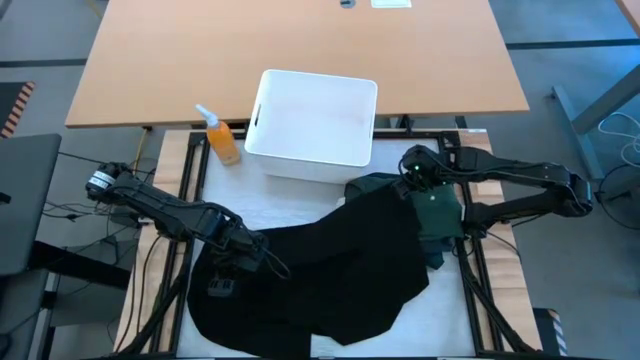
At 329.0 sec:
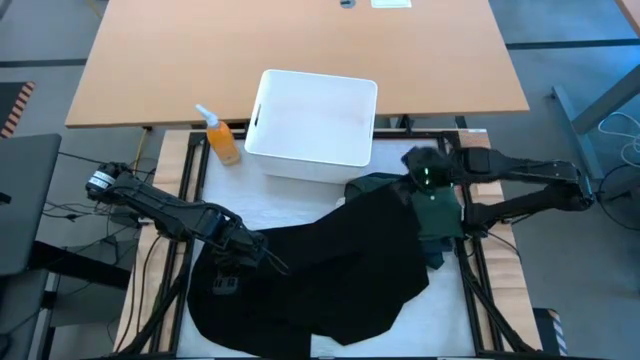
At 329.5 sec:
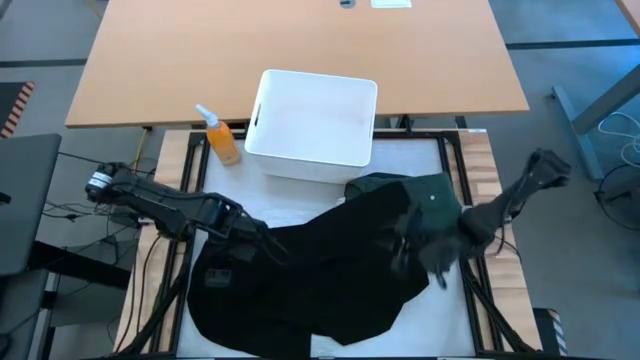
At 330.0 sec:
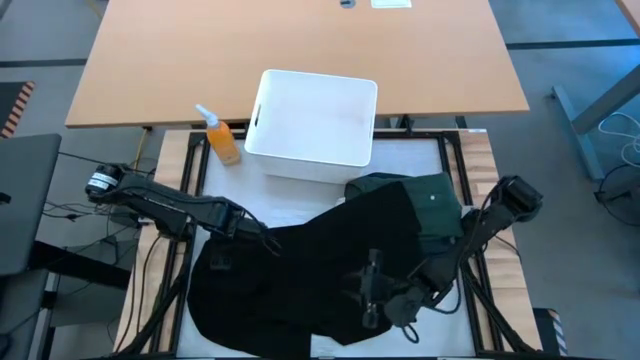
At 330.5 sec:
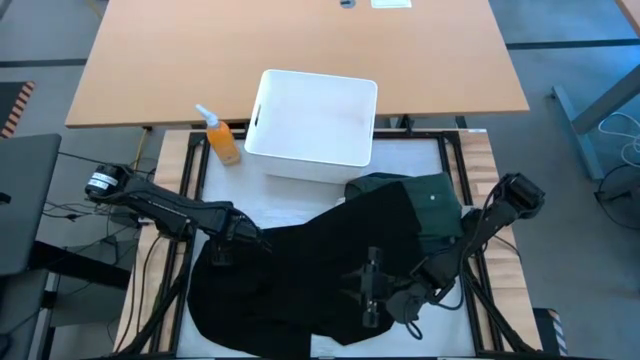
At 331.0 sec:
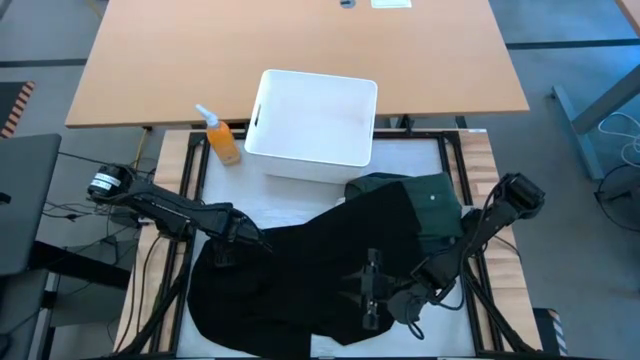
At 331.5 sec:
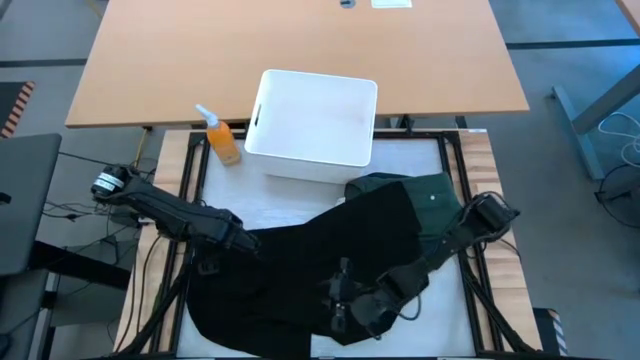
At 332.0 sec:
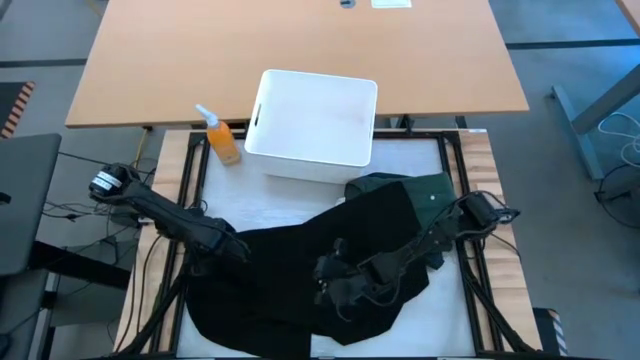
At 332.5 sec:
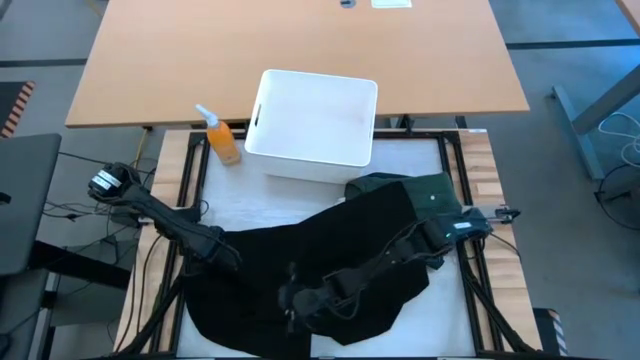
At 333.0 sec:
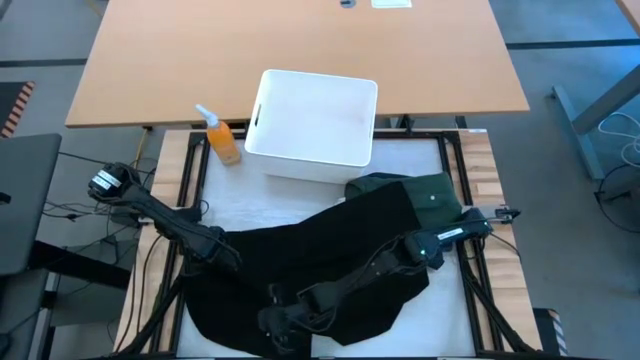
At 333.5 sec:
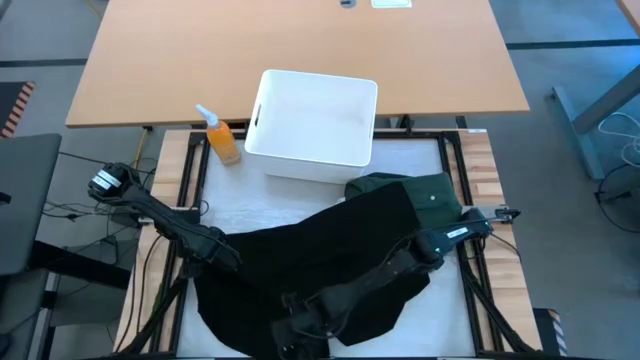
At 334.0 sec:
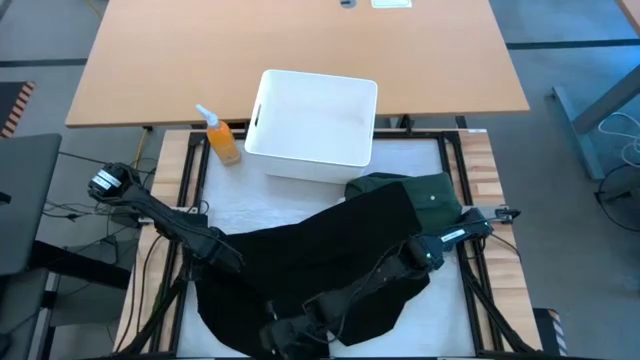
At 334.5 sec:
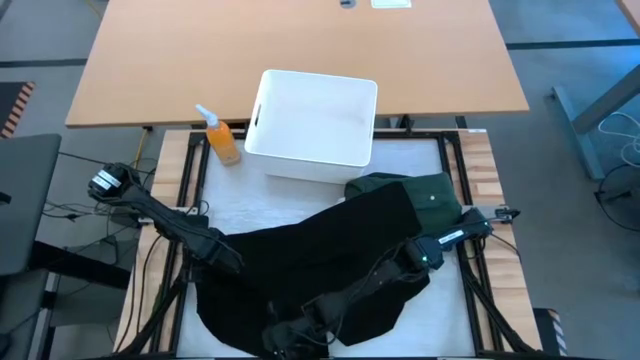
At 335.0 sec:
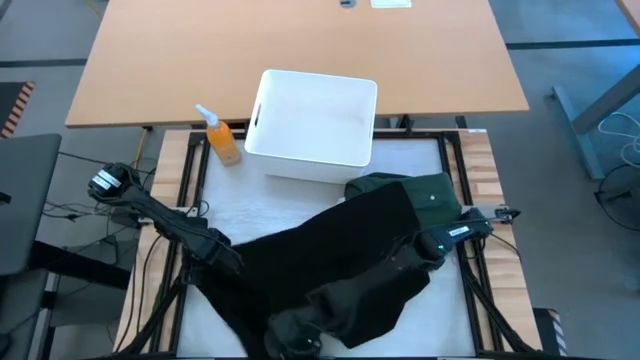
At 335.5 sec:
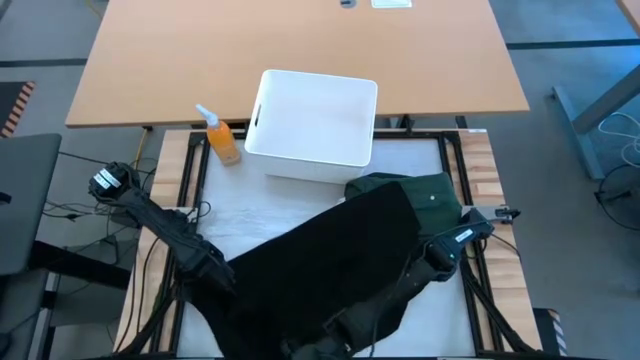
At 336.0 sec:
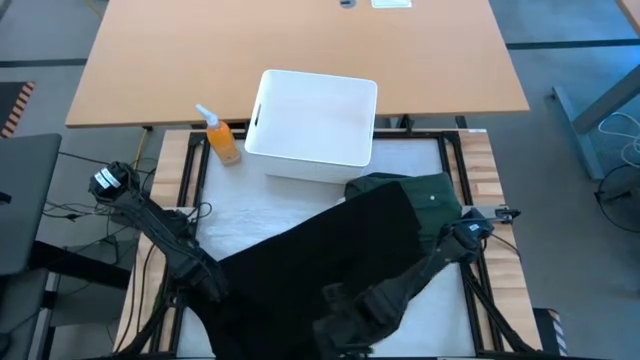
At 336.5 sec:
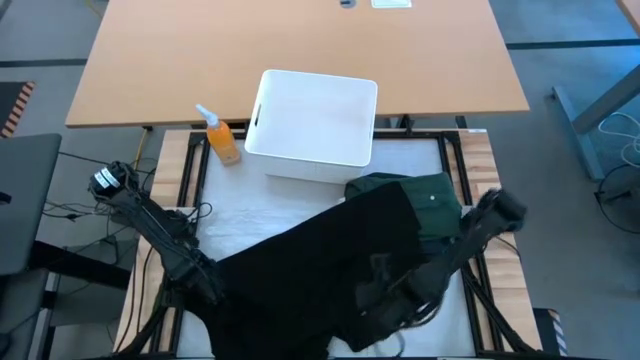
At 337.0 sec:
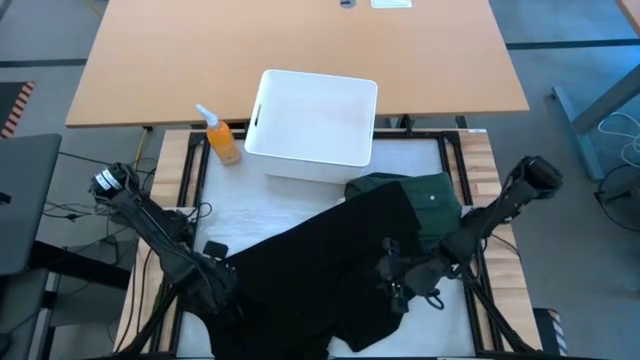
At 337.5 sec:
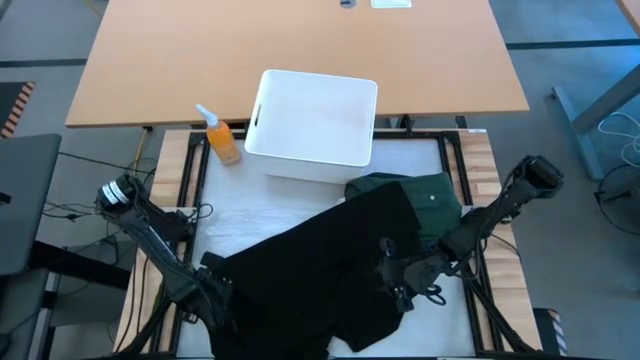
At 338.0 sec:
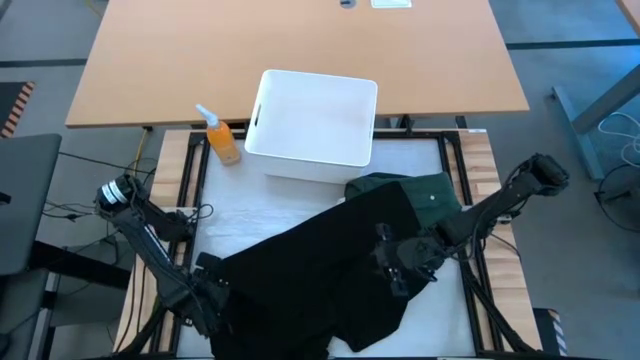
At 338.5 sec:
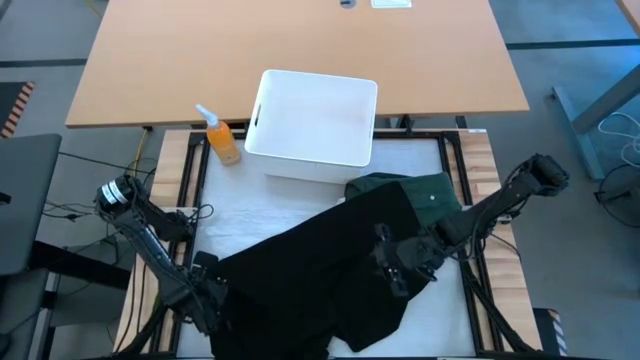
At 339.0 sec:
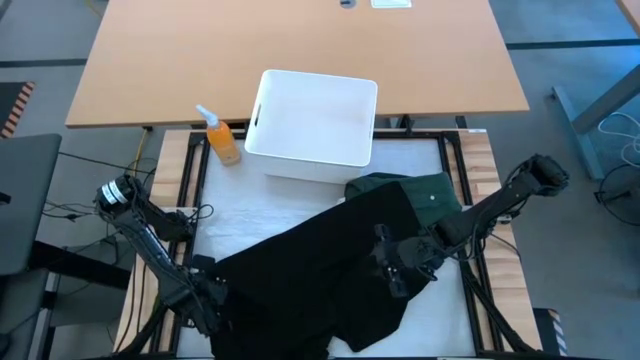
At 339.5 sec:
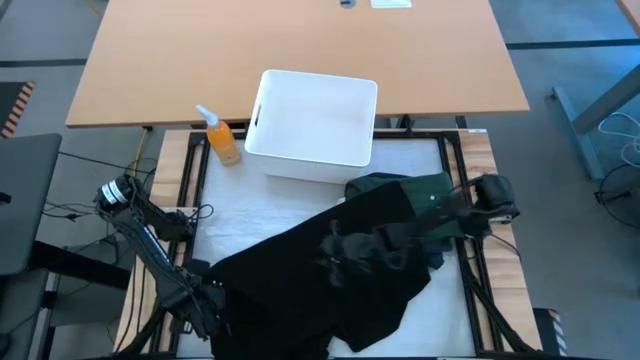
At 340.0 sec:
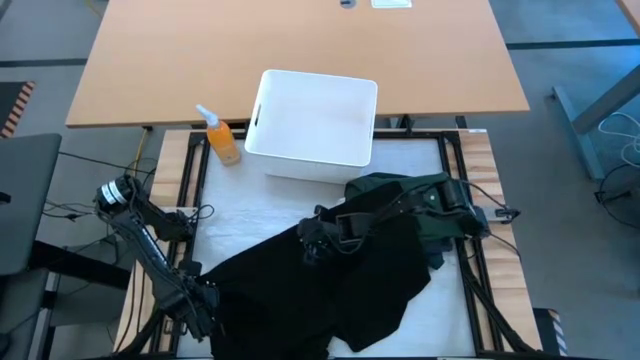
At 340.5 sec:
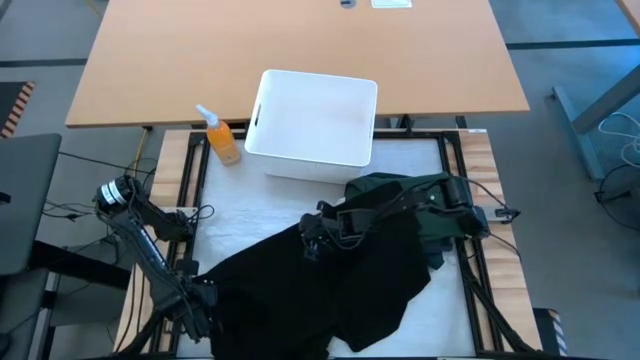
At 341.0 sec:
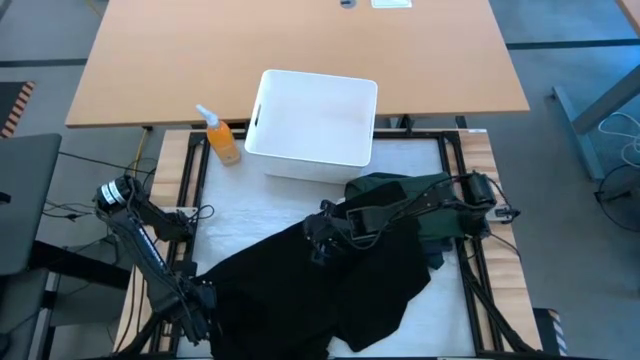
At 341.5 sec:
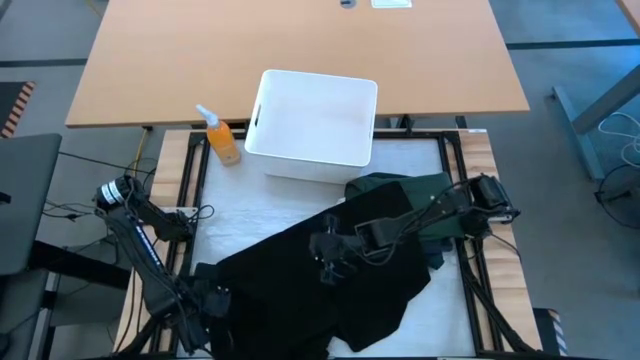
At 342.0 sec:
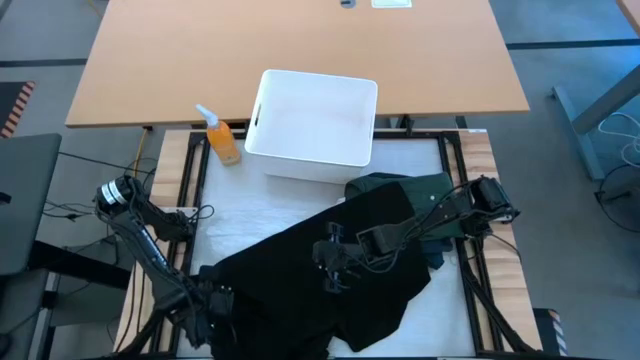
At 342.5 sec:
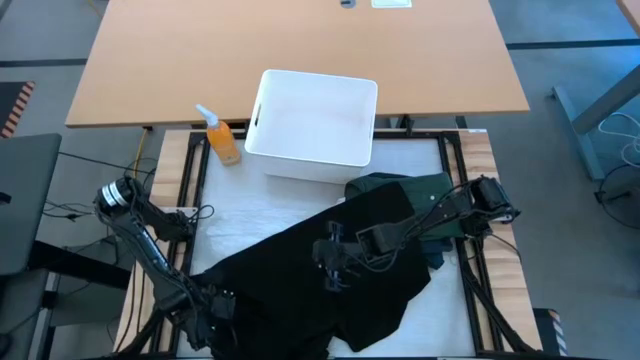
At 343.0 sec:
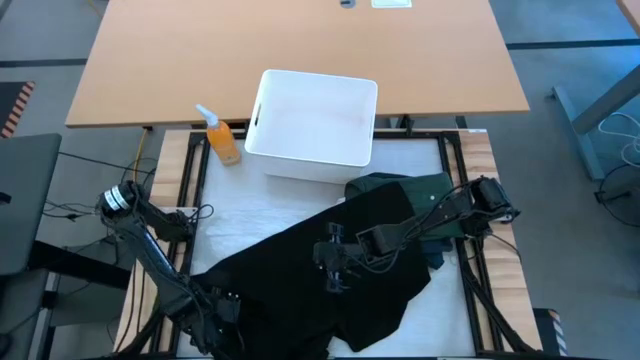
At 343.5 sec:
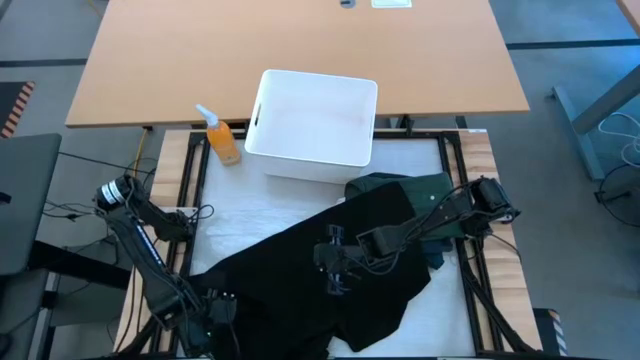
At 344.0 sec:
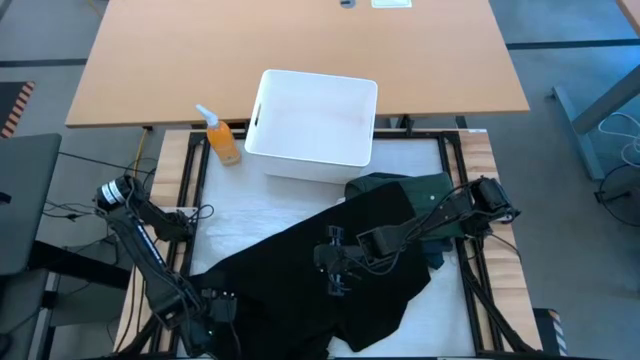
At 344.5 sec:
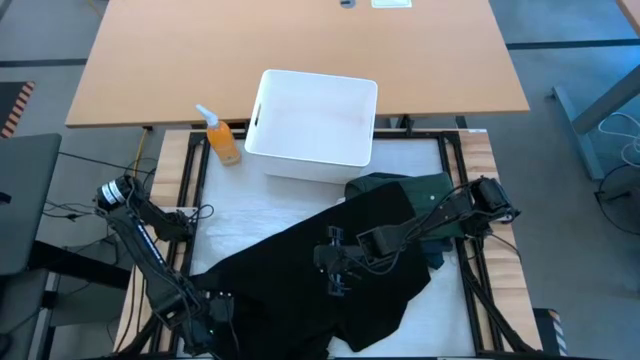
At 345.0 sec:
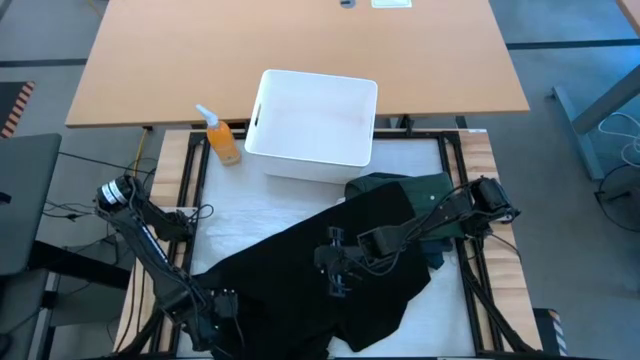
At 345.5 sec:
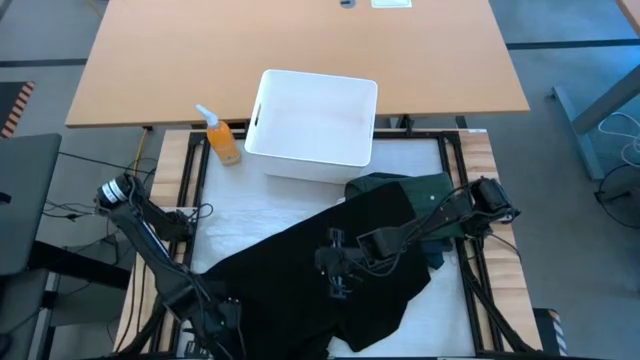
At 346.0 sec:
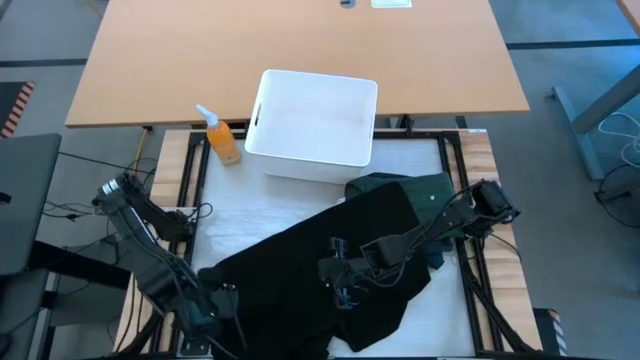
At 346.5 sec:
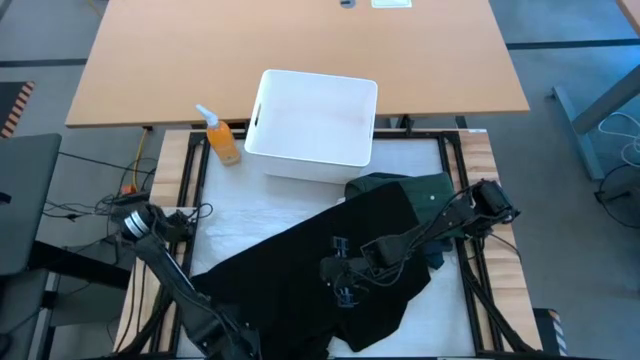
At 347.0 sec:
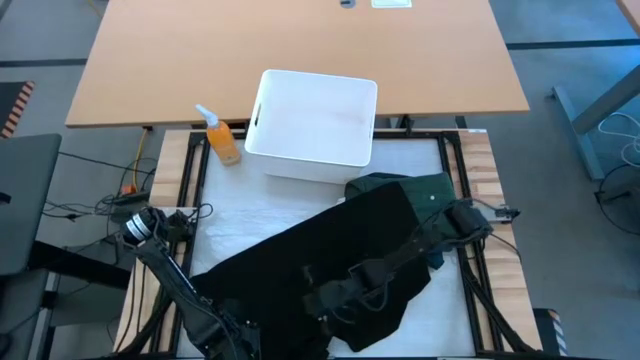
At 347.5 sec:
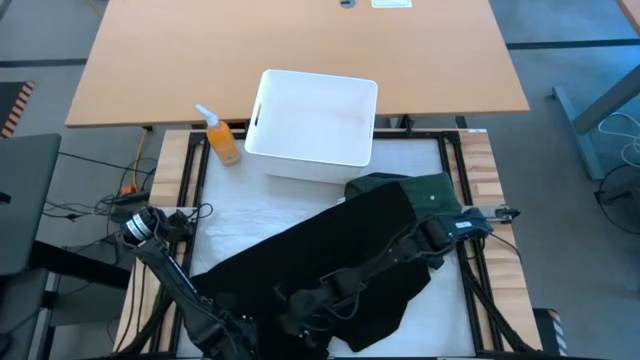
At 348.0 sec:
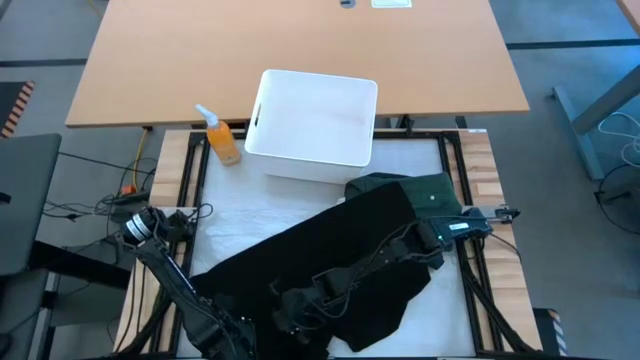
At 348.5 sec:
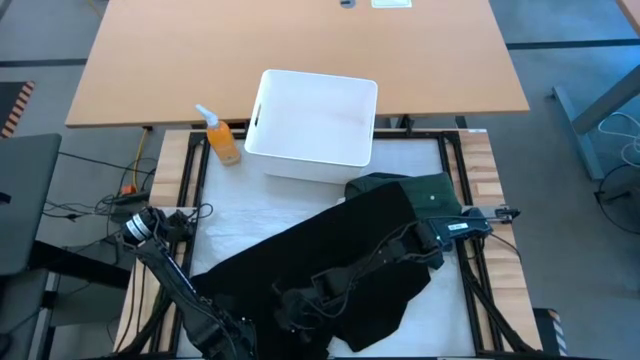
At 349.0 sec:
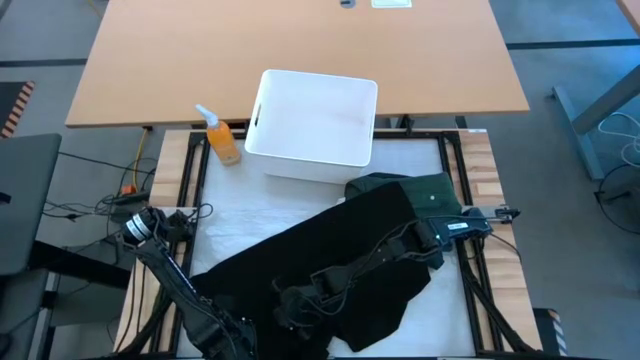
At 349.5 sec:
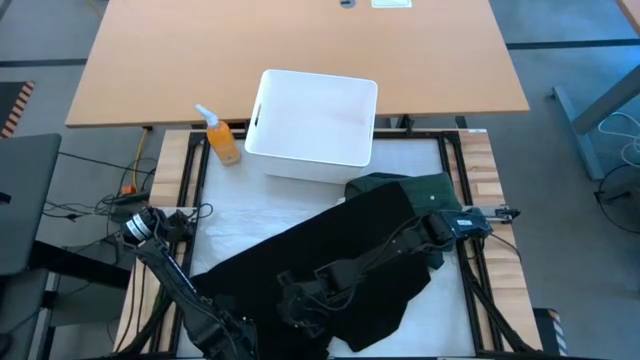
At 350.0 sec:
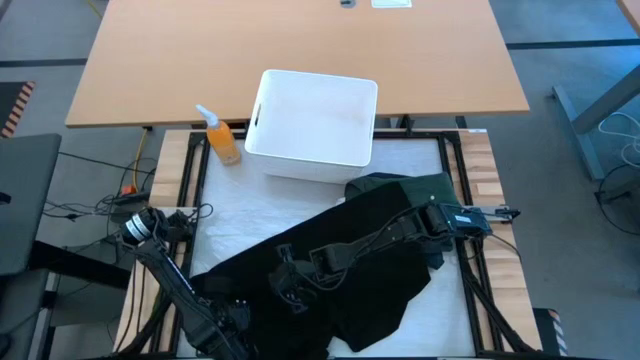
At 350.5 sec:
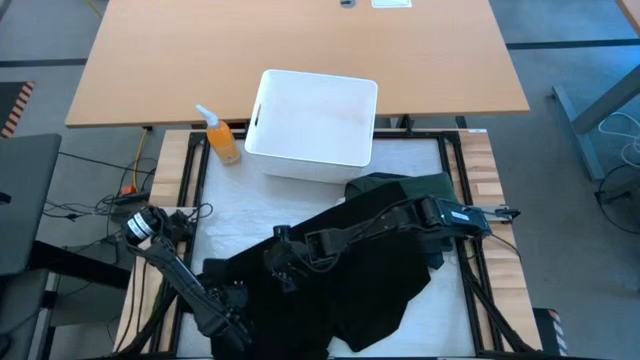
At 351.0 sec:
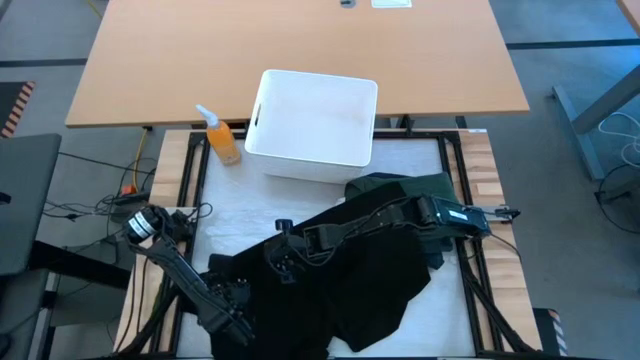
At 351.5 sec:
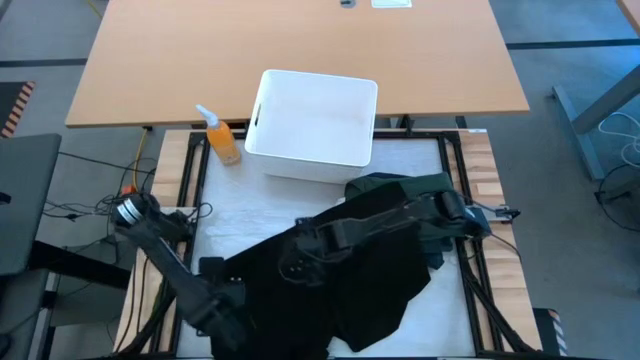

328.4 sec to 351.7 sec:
Task: Fold laundry
Fold the black shirt from the white laundry organizer
